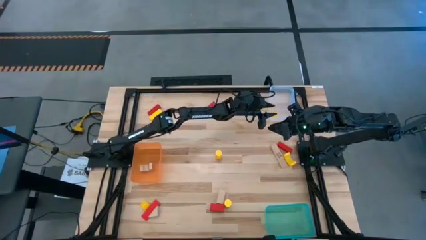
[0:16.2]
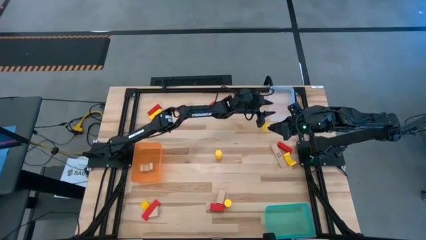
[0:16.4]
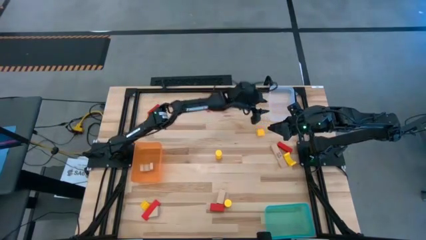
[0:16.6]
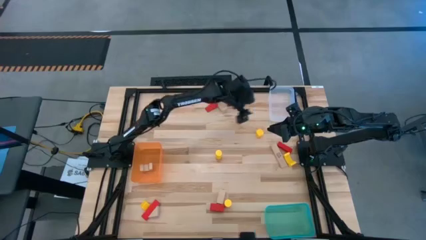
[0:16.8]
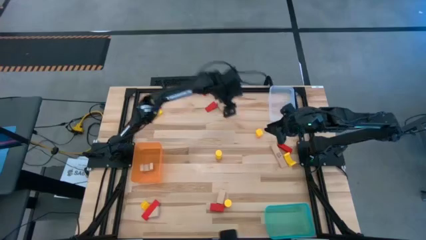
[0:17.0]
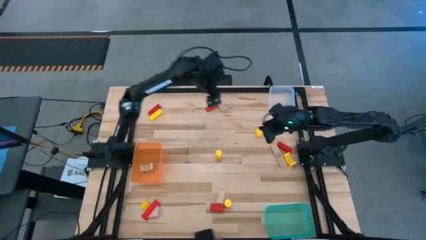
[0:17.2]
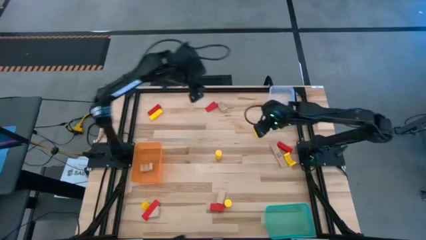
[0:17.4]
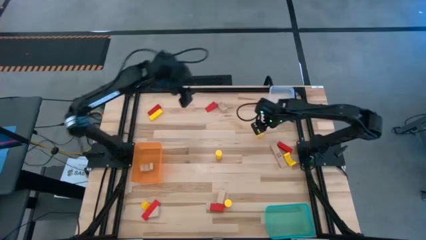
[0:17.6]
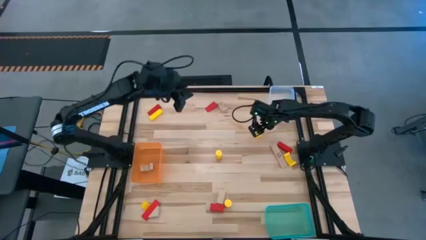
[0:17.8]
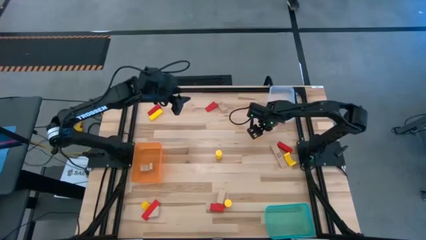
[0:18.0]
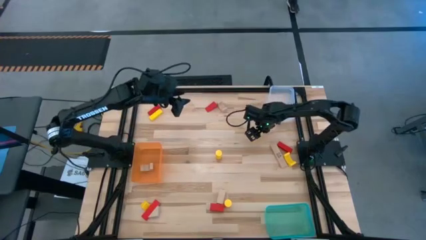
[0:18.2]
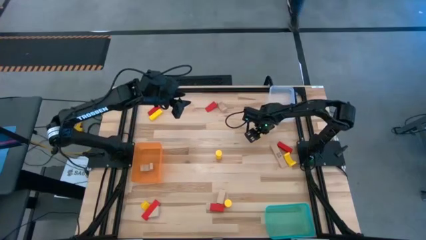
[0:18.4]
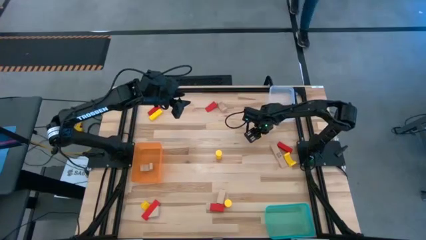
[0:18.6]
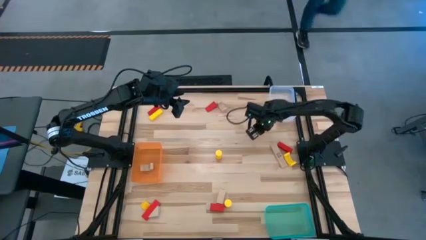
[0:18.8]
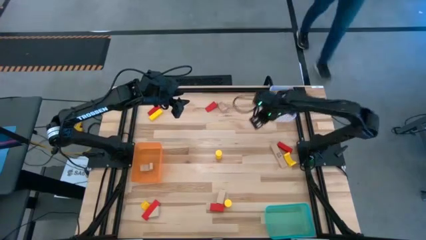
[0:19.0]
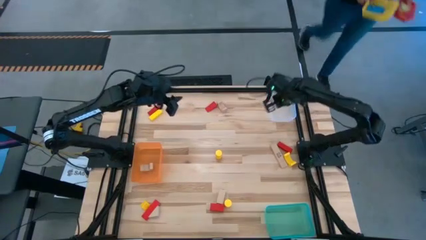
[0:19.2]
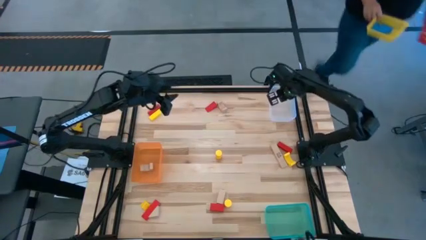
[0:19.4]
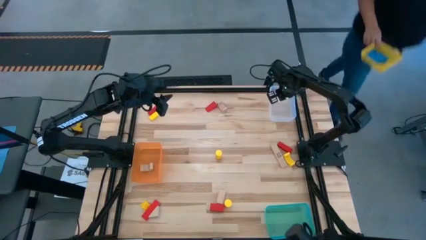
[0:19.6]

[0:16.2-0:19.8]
Task: Sort & place blocks by color
Put the yellow block into the transparent bin

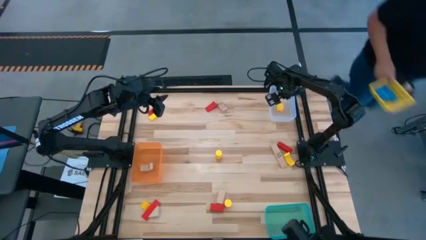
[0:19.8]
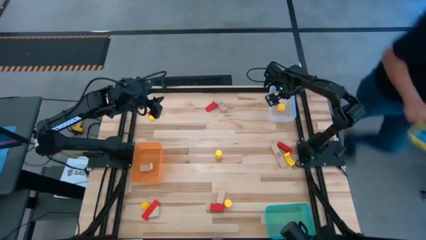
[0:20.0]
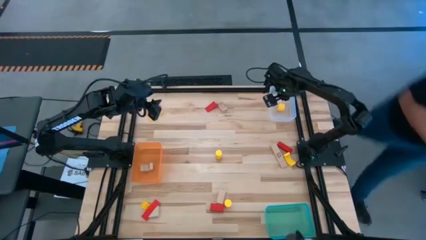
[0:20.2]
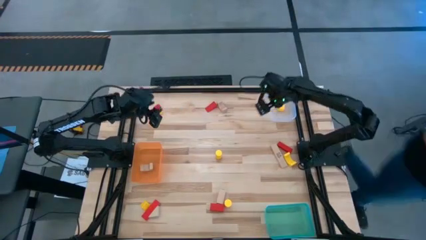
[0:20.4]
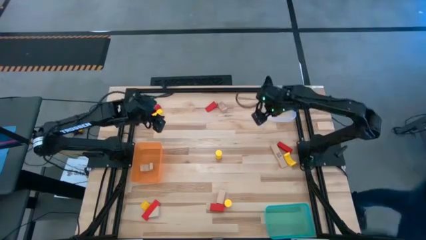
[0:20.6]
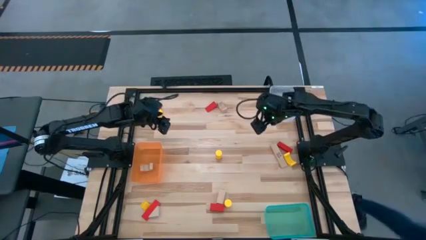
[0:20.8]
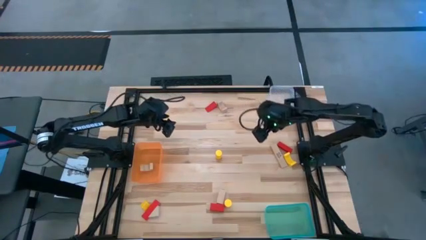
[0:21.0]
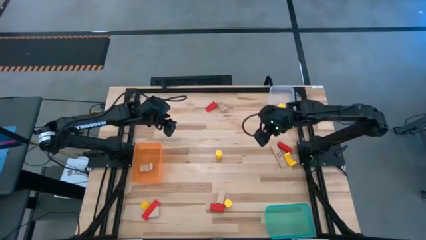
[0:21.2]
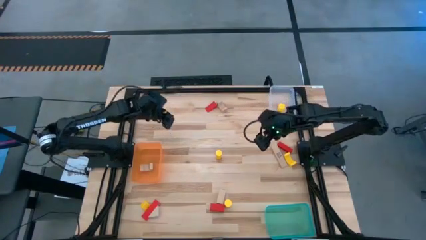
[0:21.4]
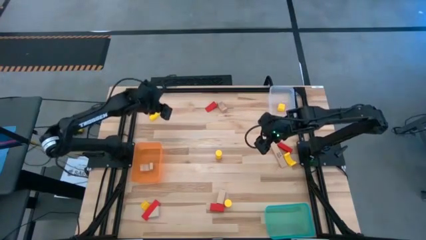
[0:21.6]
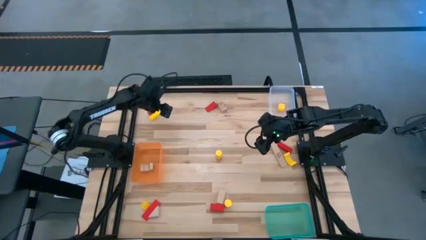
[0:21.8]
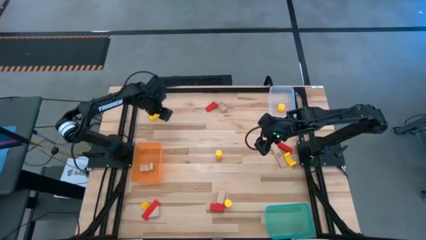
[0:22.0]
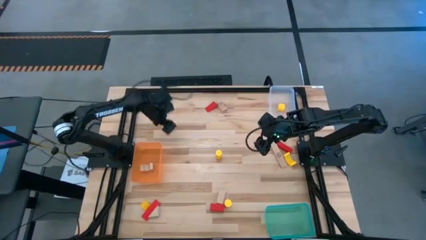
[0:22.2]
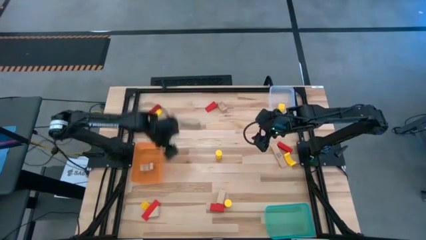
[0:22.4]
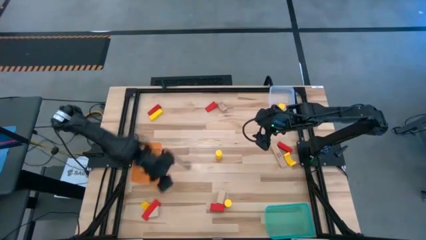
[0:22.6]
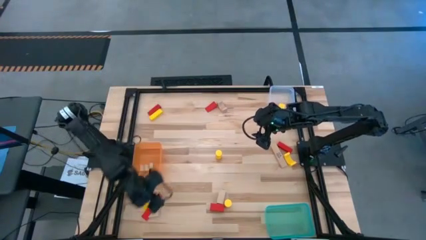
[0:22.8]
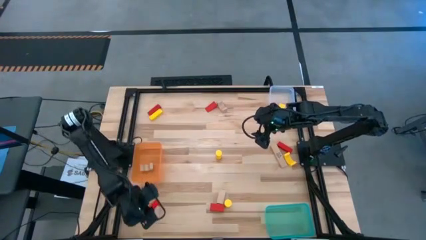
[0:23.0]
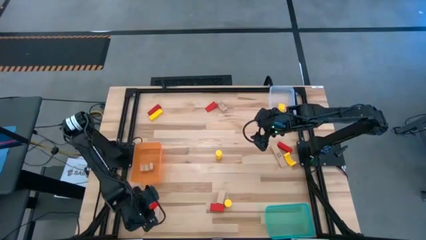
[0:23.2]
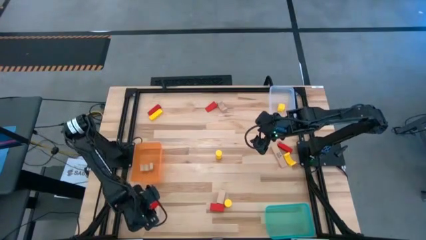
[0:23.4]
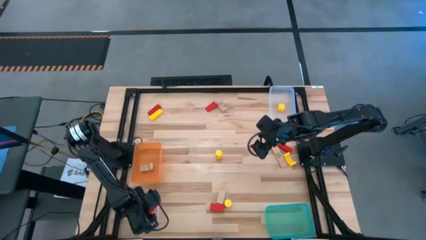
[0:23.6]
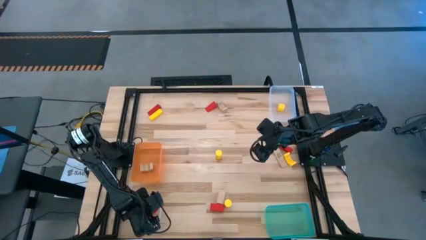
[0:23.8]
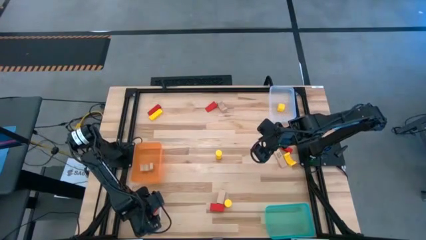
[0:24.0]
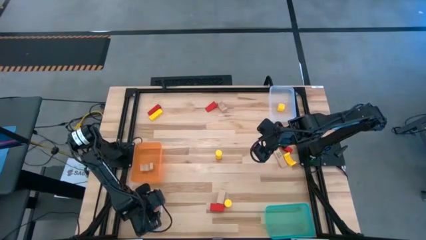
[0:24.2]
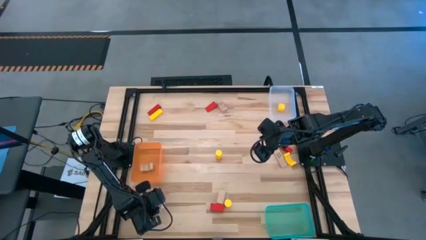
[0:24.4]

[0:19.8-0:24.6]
Put the brown block into the orange bin

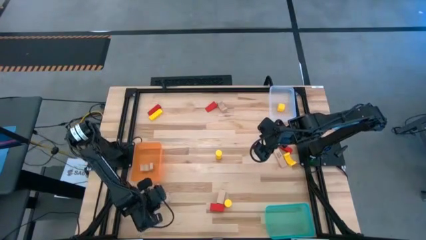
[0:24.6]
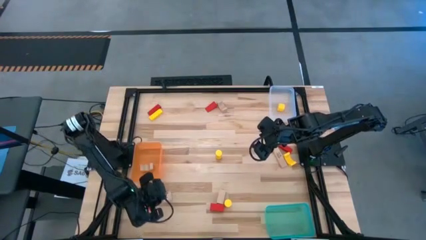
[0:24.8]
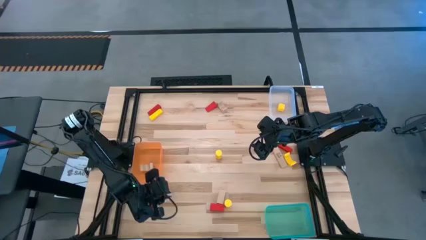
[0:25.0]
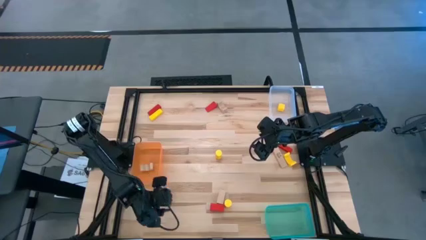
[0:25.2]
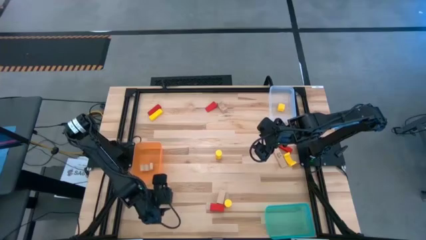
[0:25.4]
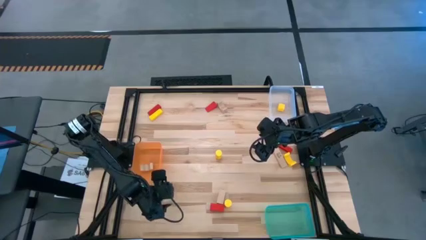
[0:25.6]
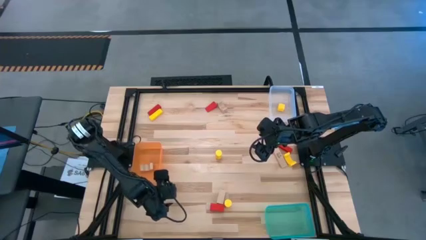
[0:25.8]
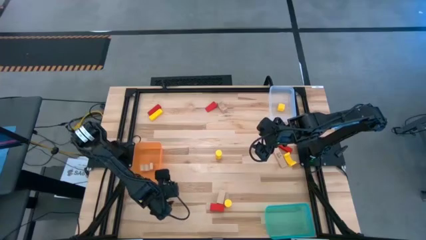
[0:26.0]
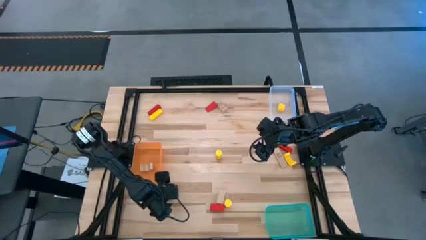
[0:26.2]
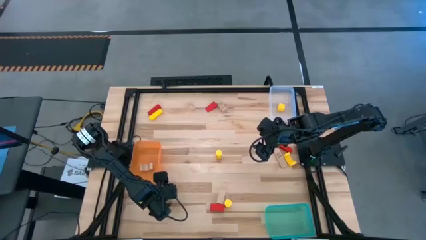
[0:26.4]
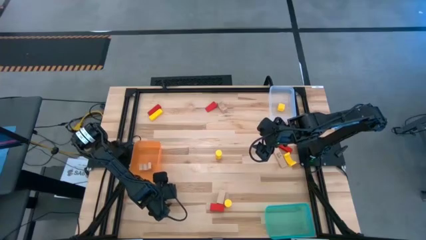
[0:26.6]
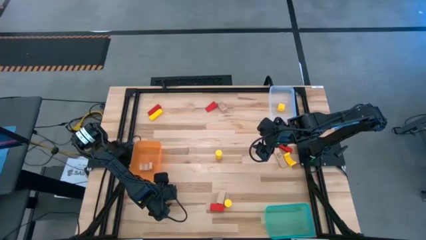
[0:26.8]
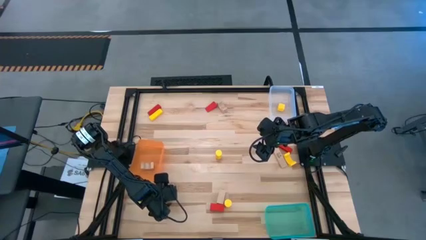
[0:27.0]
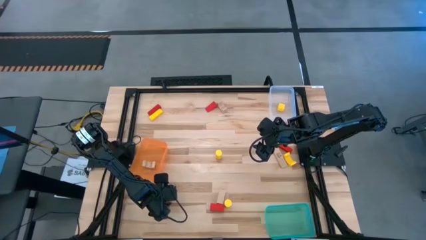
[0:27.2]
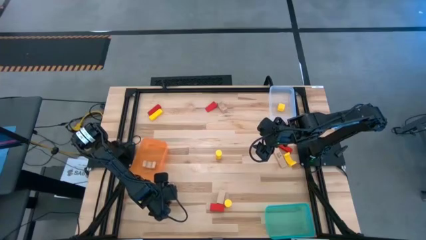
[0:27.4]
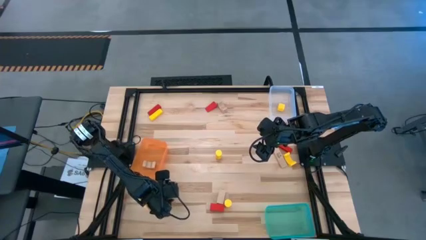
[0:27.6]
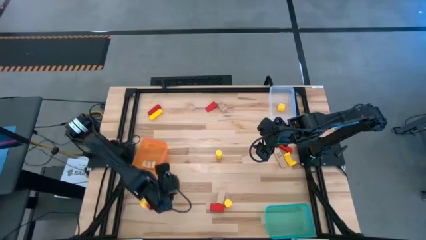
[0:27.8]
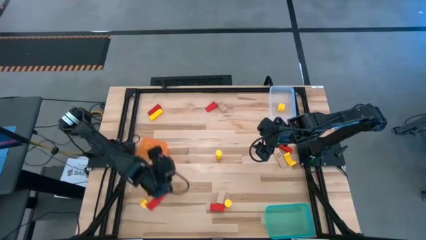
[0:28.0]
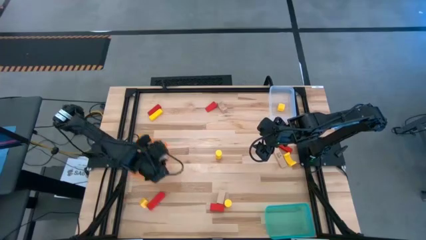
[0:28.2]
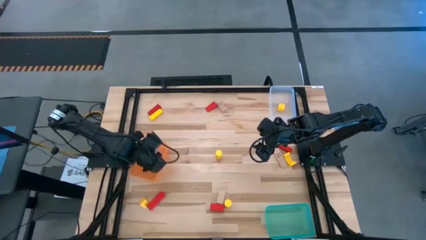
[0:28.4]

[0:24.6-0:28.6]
Put the brown block into the orange bin

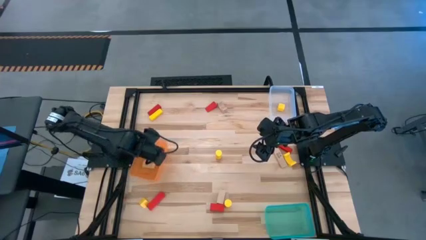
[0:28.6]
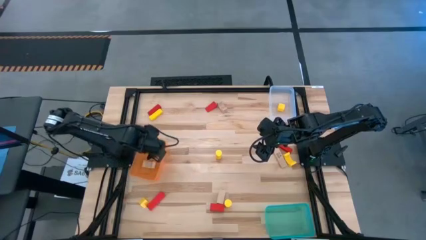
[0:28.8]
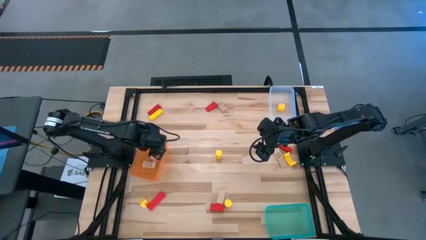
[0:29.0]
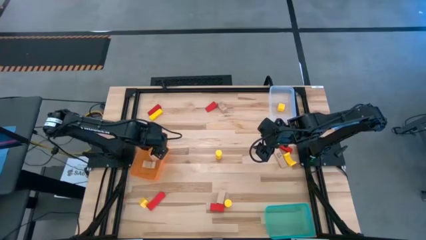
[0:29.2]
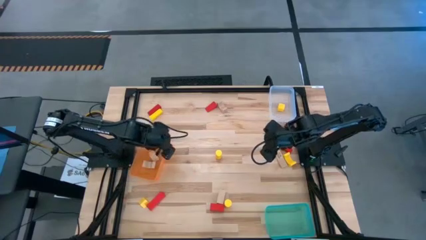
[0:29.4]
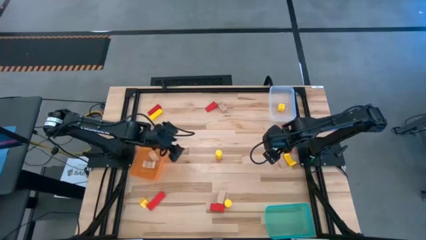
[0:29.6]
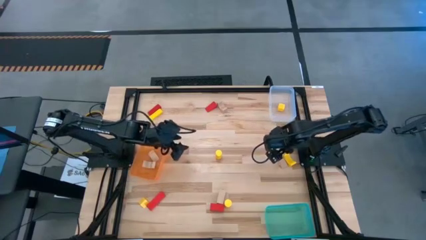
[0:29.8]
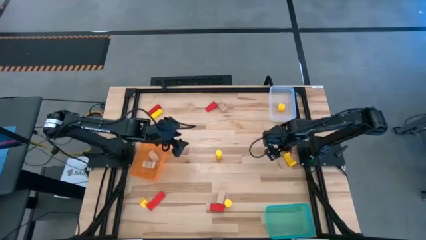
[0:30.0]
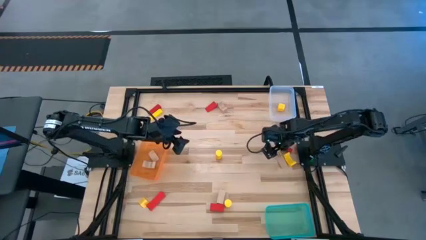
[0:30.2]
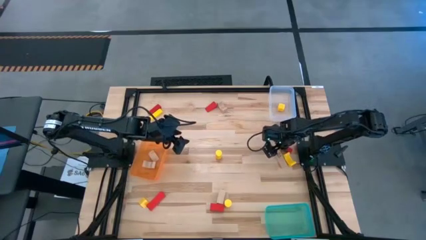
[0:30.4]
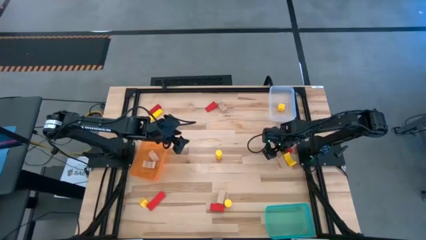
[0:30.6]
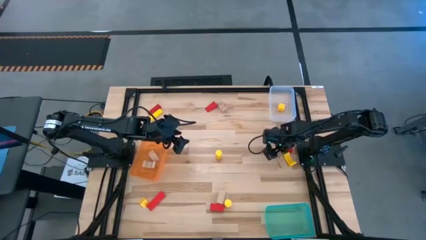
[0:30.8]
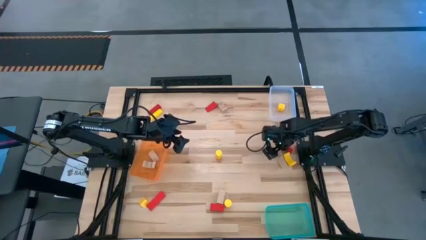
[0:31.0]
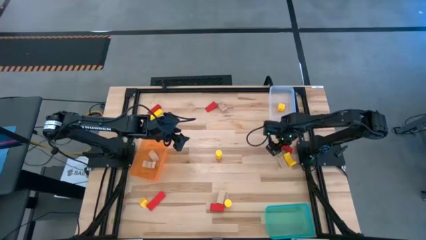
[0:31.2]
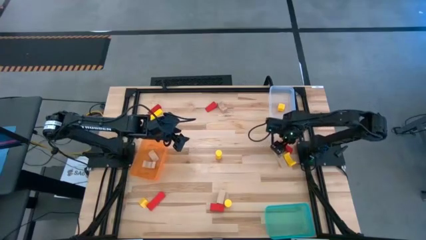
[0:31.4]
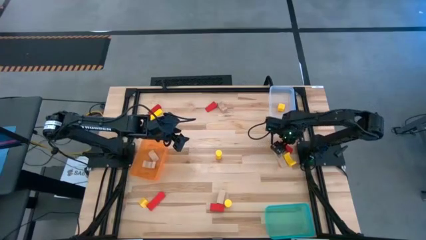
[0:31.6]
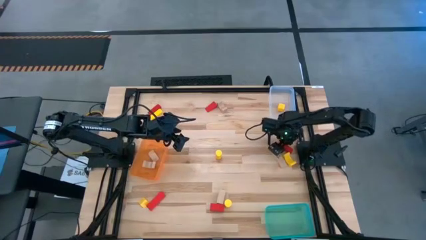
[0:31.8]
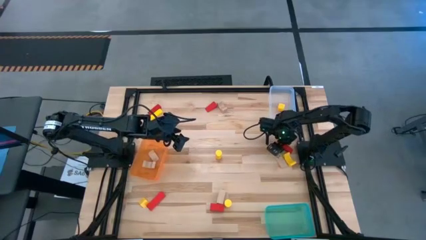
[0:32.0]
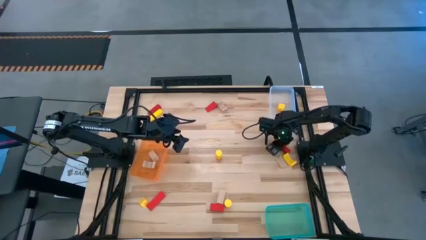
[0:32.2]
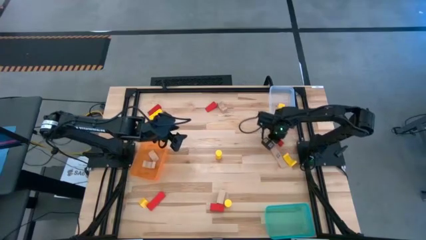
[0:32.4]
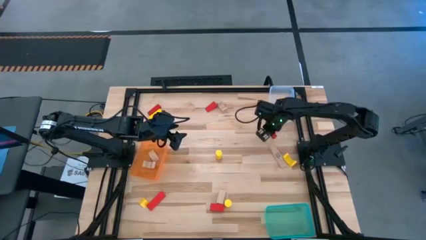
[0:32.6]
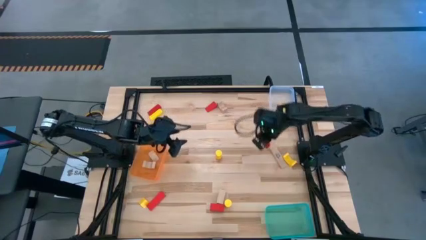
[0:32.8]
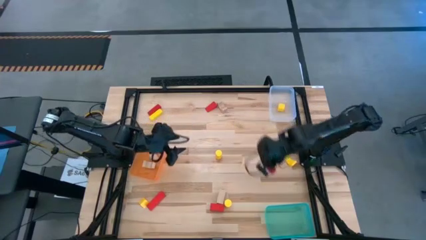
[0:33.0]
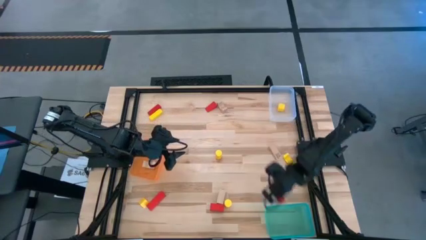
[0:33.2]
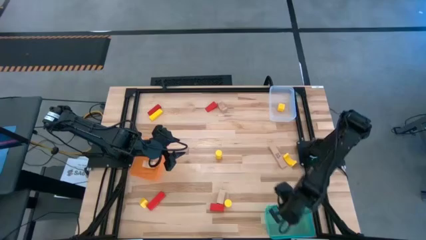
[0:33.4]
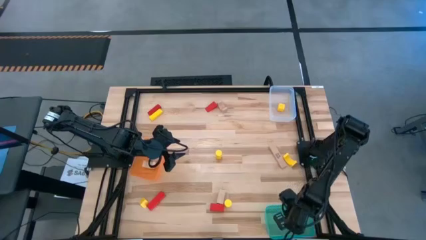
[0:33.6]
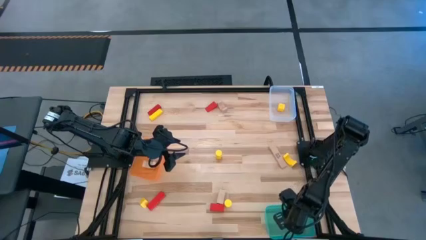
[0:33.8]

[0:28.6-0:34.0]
Put the red block into the green bin
